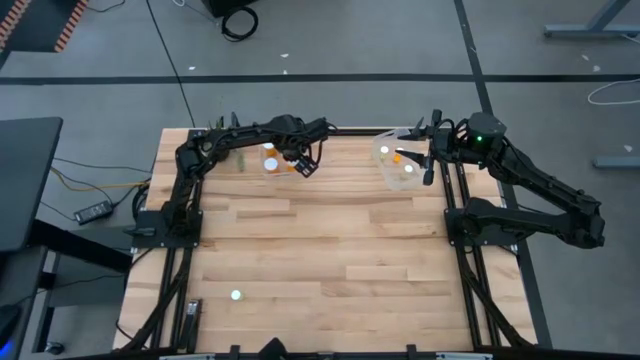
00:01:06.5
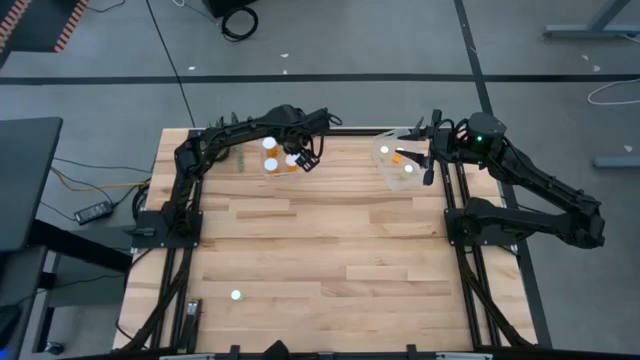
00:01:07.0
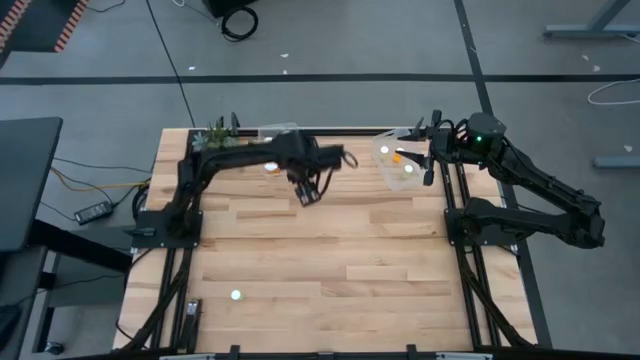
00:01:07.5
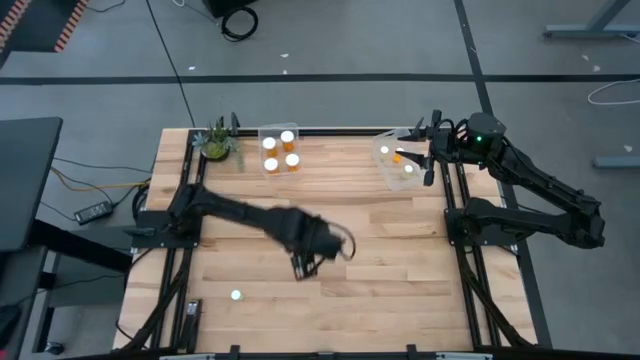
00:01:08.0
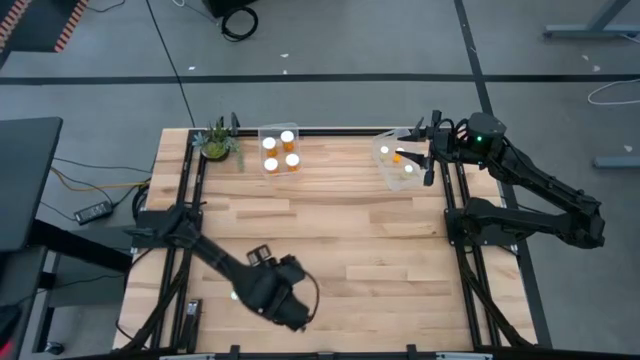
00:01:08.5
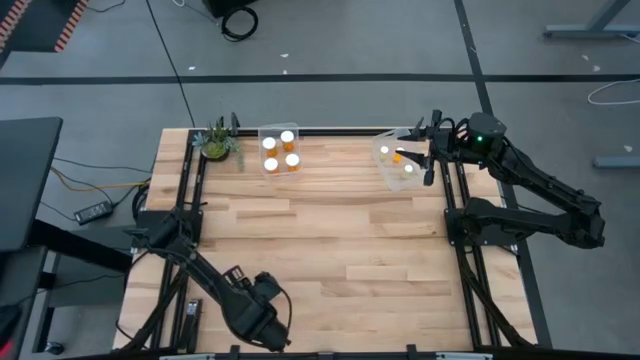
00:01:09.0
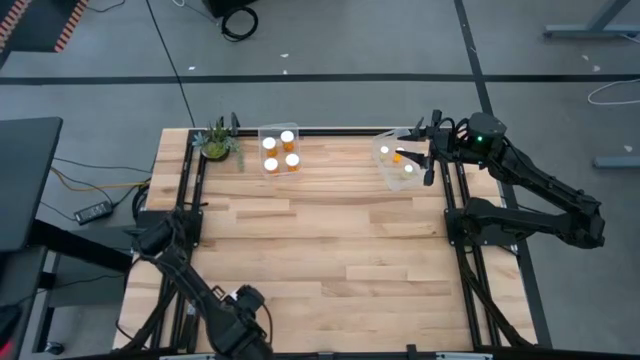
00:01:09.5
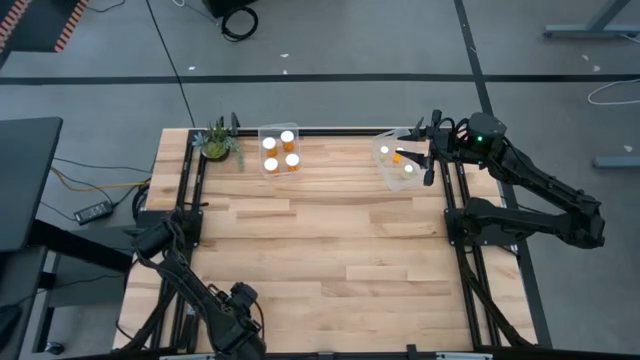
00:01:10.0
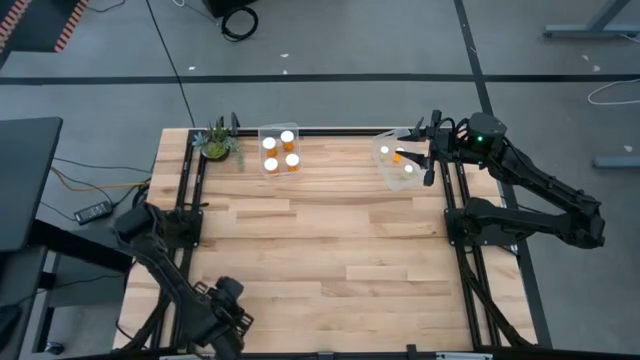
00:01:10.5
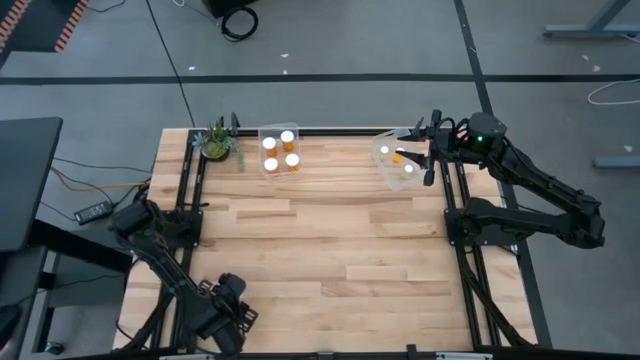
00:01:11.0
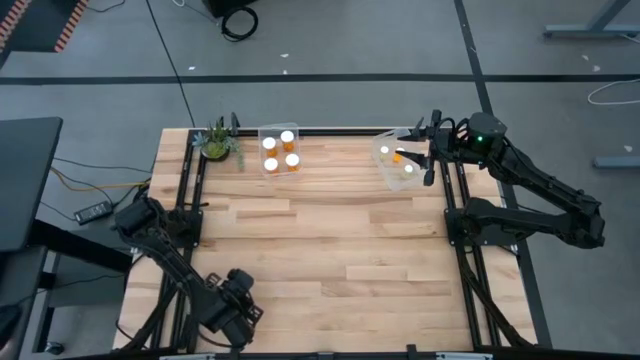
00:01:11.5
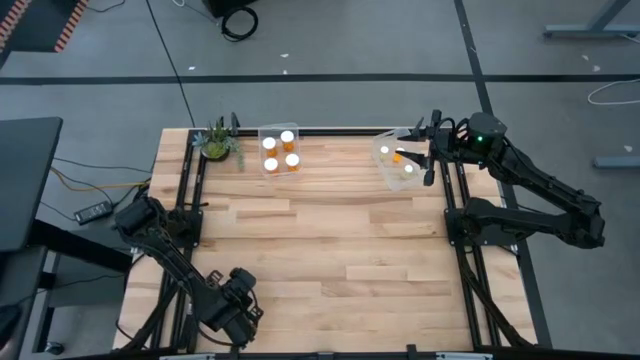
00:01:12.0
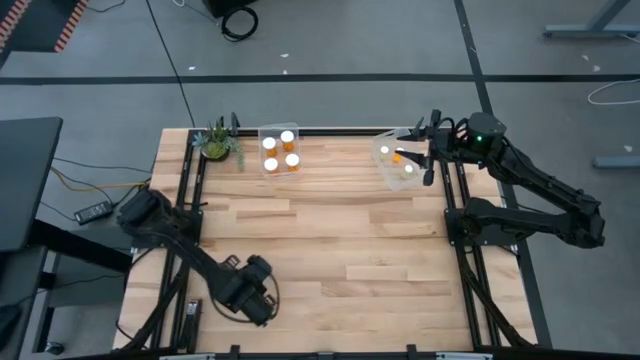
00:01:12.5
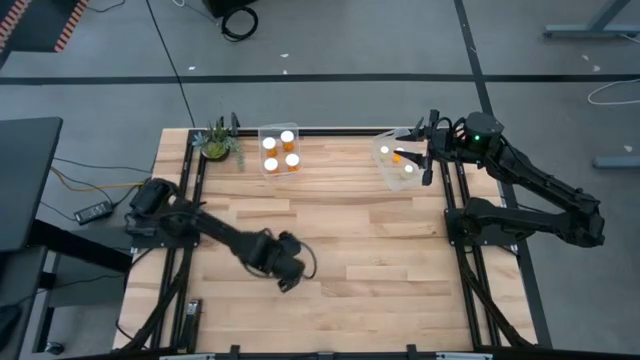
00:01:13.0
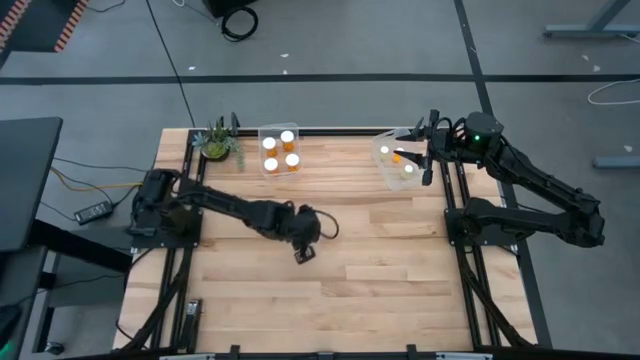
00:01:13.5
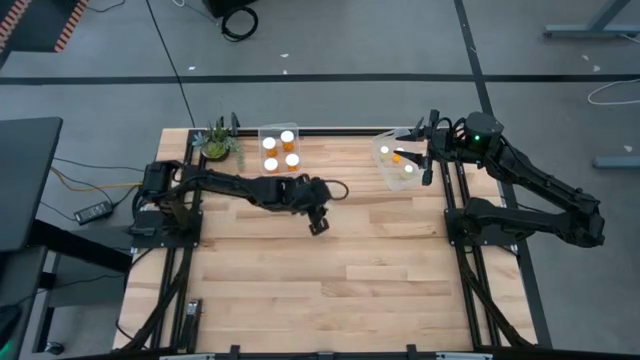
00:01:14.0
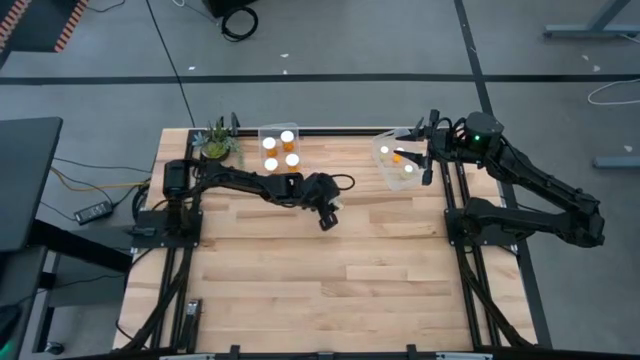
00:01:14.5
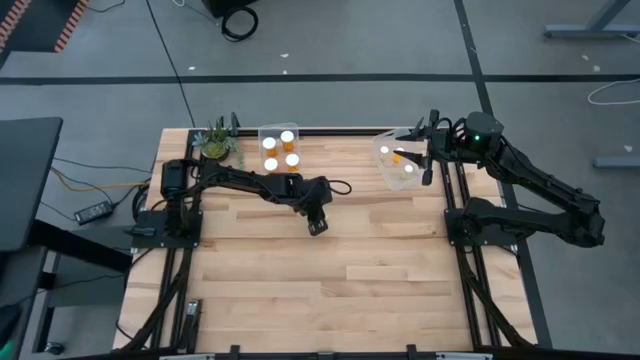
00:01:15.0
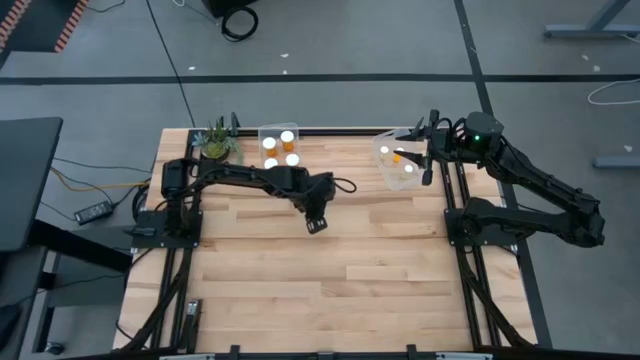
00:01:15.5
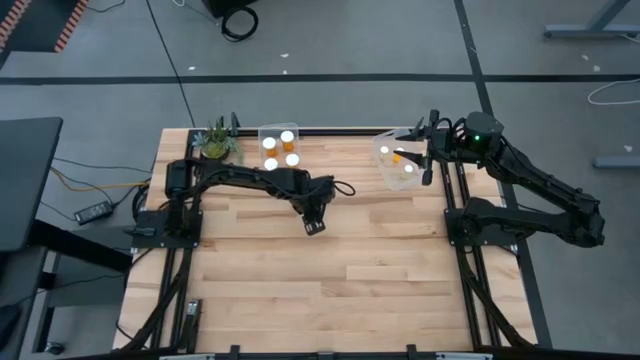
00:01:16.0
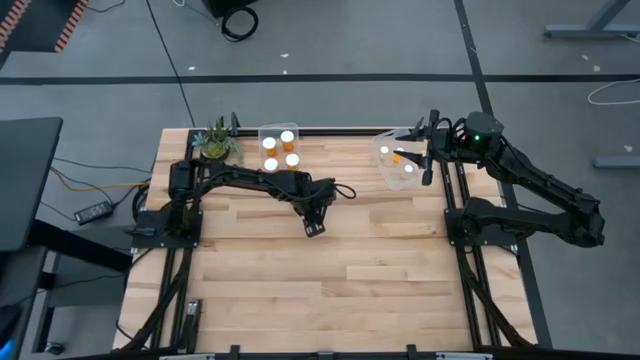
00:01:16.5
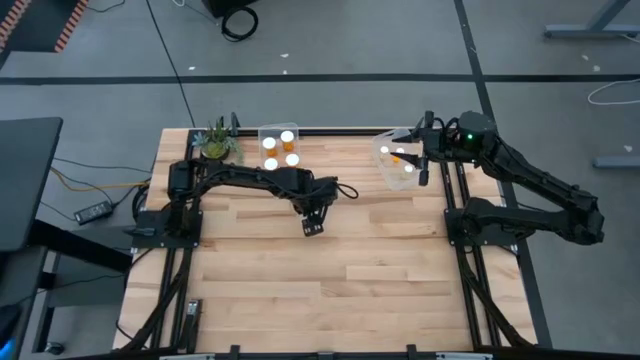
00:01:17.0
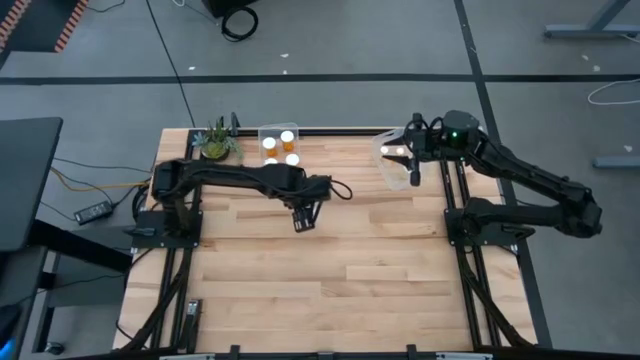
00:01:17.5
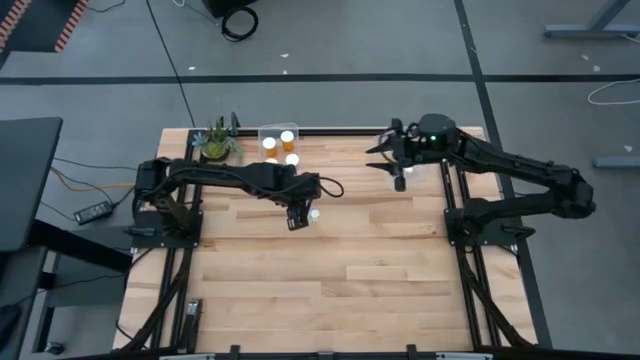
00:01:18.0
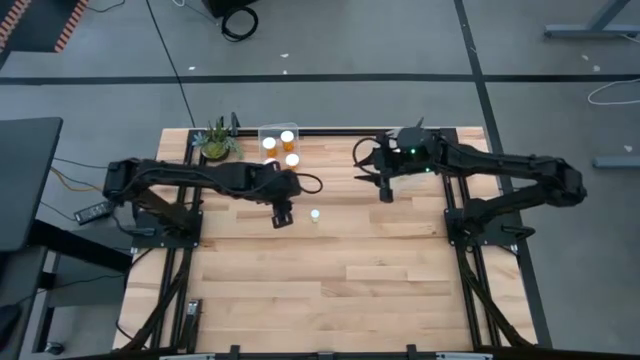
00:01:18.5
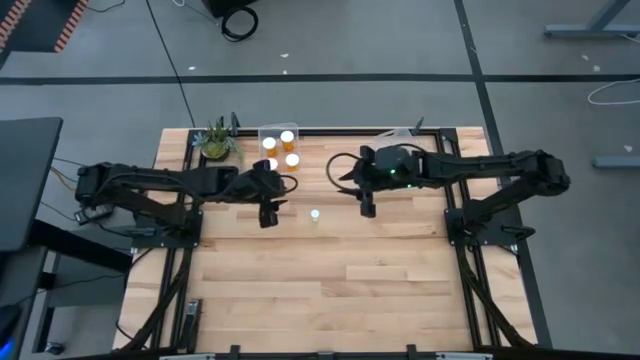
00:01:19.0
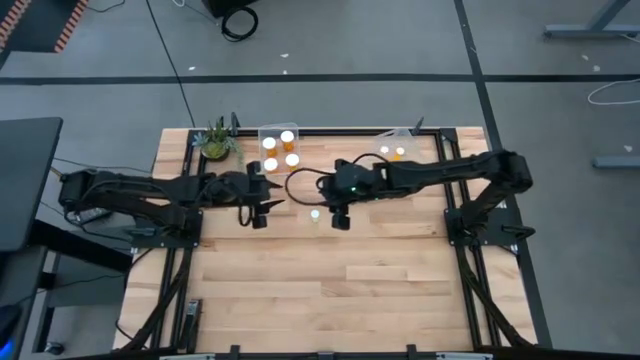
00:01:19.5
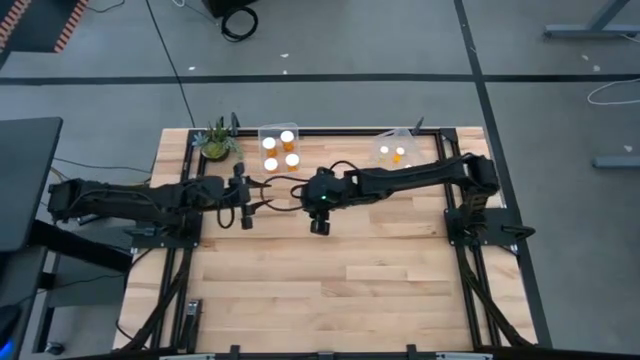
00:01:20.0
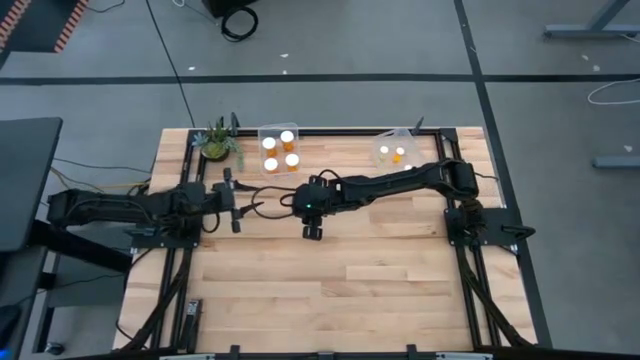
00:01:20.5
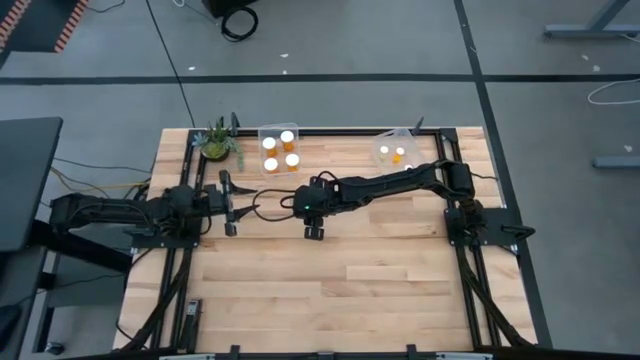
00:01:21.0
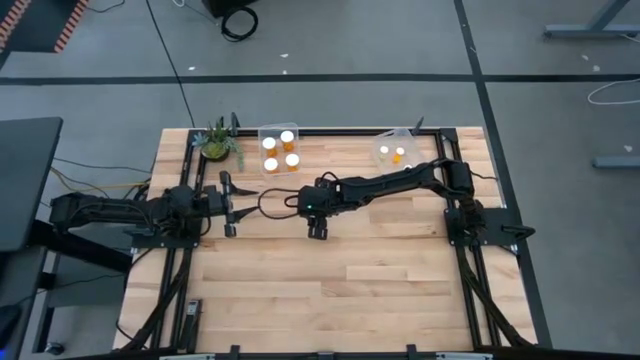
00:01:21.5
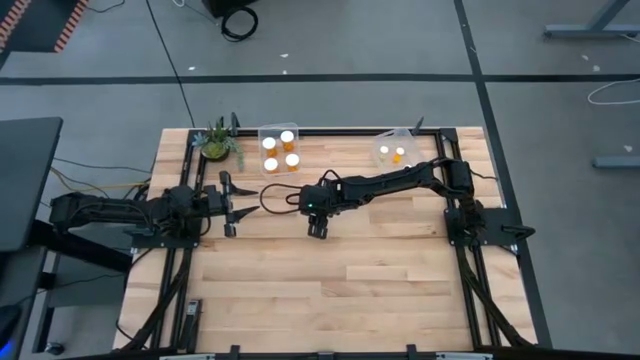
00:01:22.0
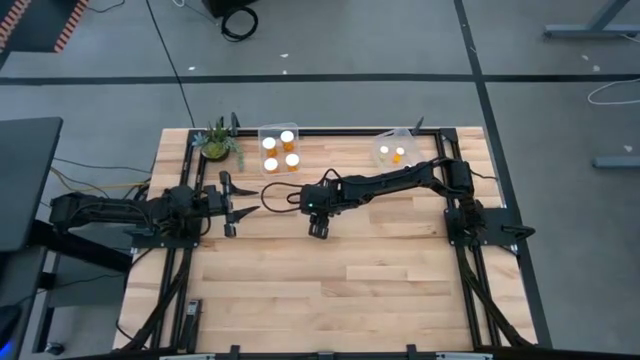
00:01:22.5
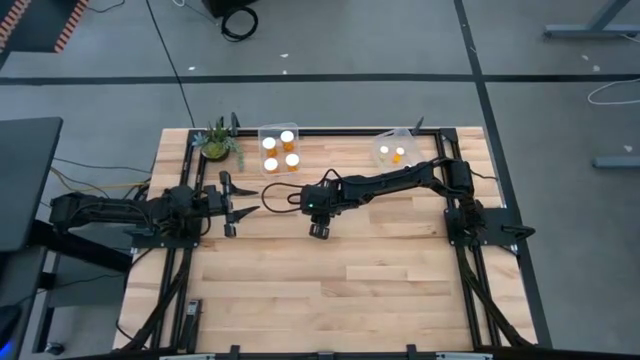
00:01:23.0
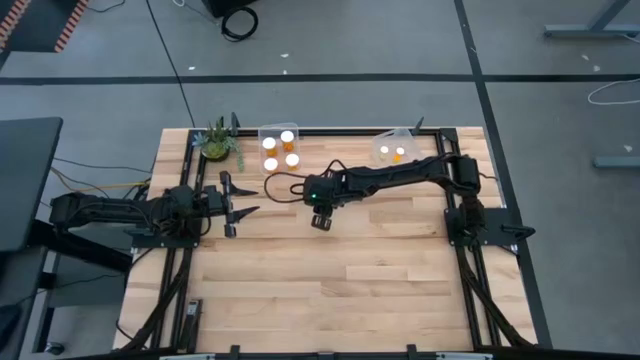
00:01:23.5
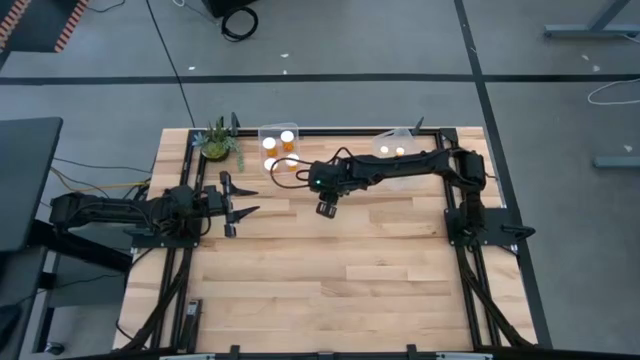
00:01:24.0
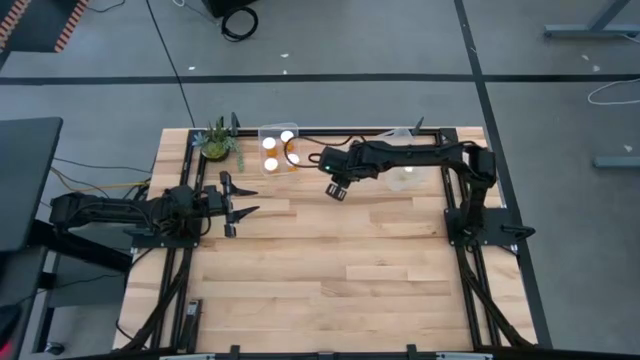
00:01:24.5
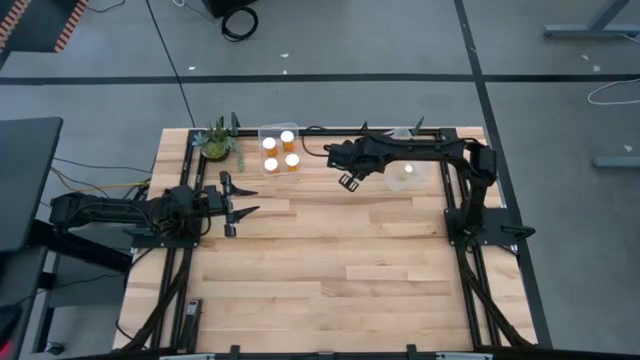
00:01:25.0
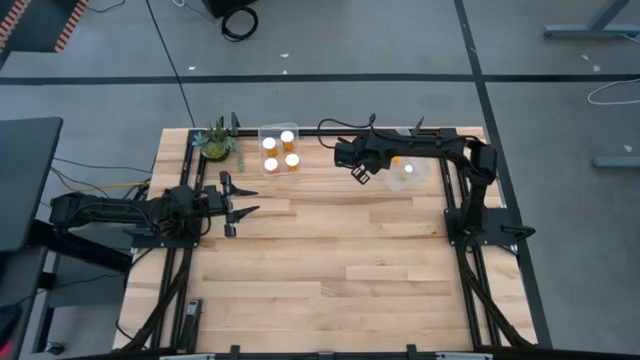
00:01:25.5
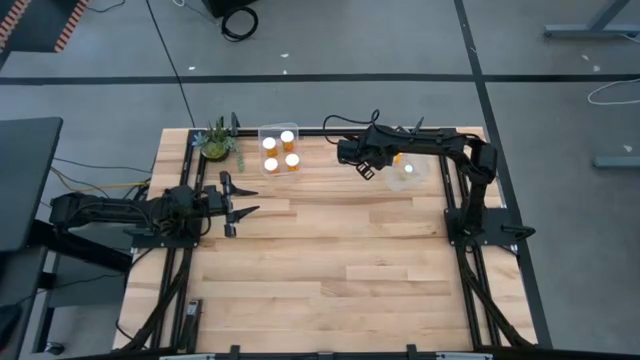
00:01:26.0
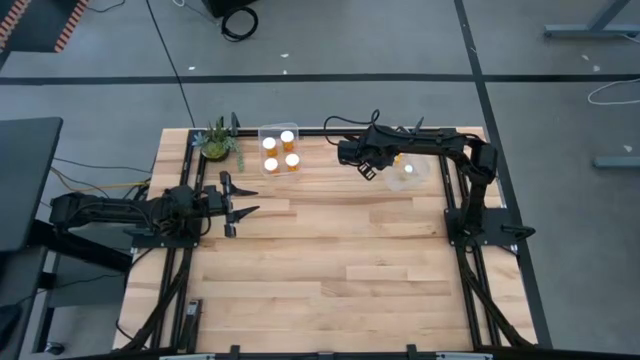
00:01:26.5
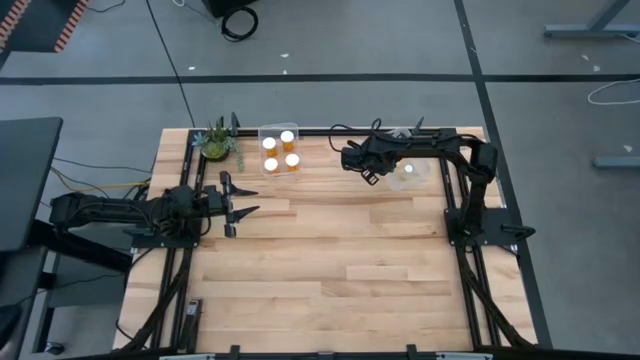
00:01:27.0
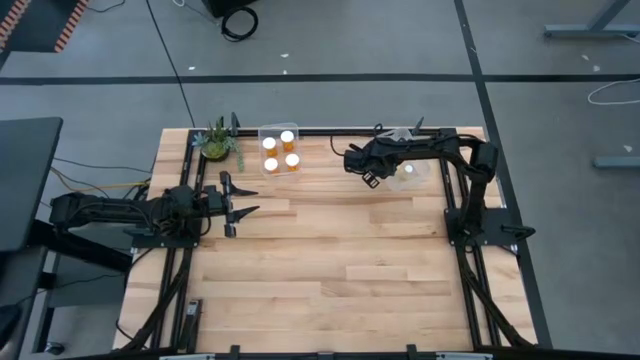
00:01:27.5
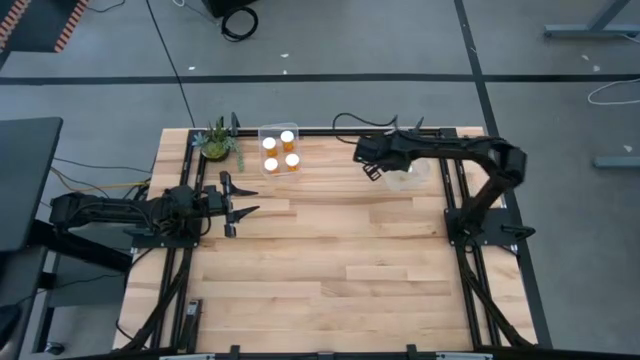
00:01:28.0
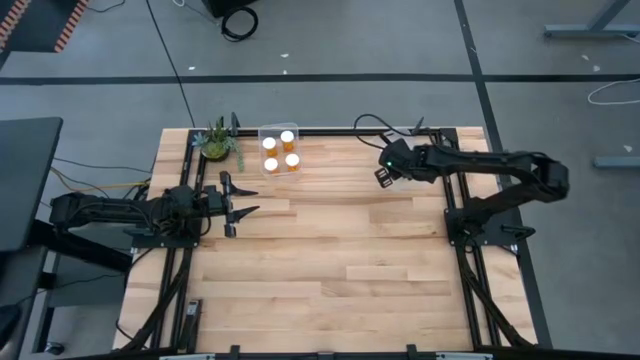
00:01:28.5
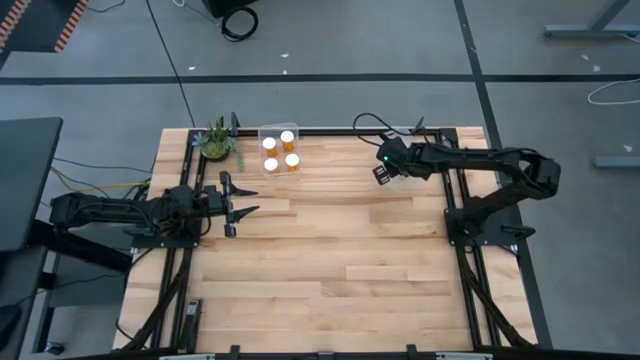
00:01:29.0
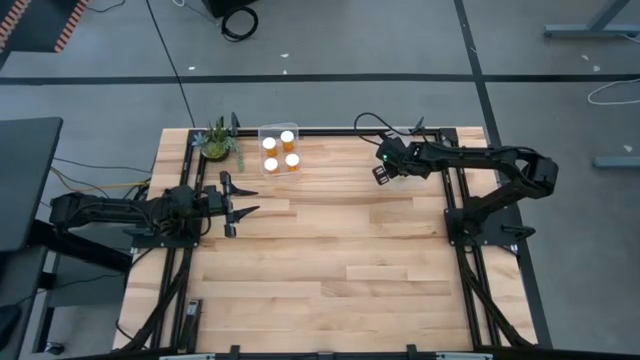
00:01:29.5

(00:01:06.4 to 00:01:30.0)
Task: Pick and place medicine bottles into bin by pill shape (circle, oval)
Put the small yellow pill bottle into the right transparent bin
